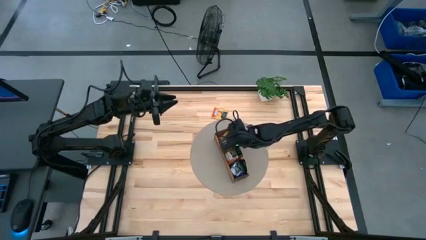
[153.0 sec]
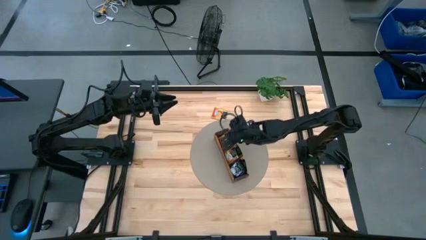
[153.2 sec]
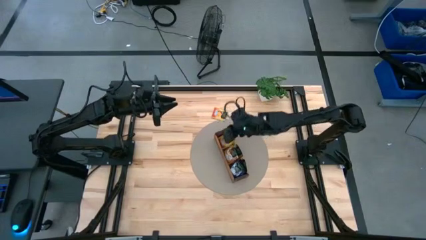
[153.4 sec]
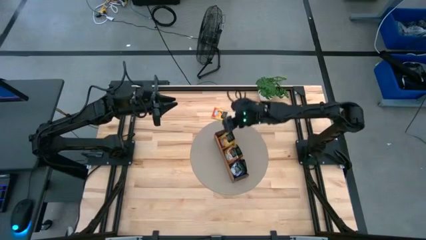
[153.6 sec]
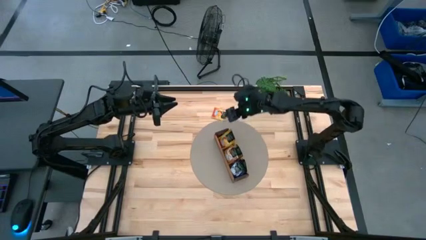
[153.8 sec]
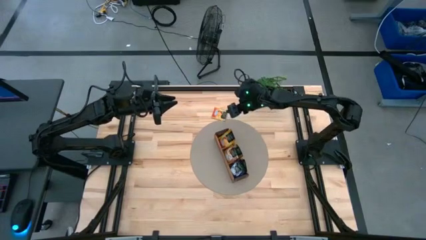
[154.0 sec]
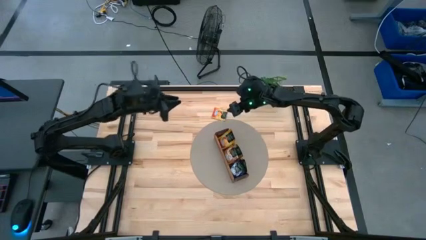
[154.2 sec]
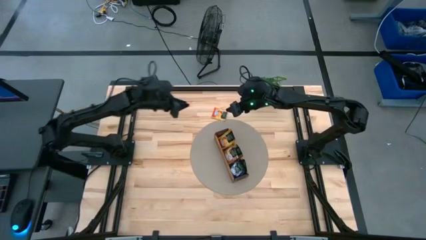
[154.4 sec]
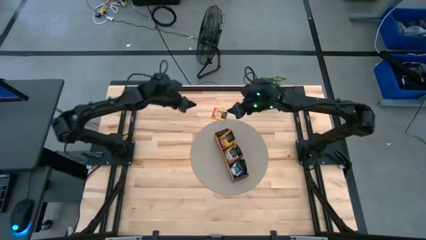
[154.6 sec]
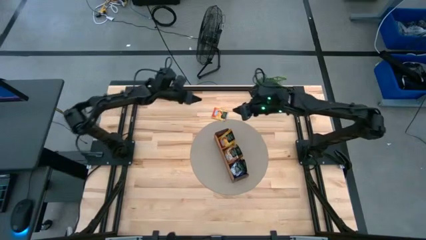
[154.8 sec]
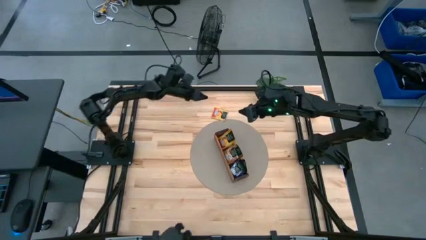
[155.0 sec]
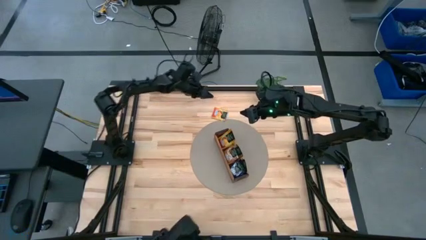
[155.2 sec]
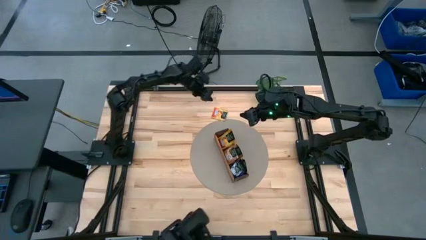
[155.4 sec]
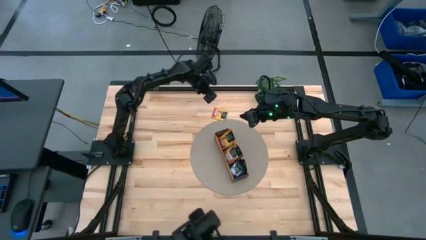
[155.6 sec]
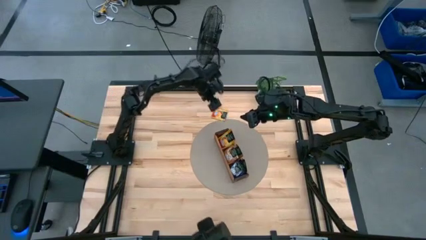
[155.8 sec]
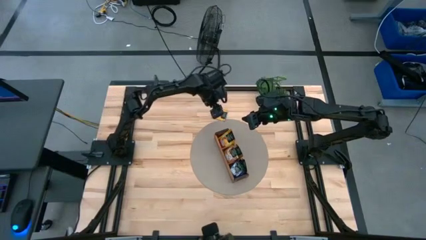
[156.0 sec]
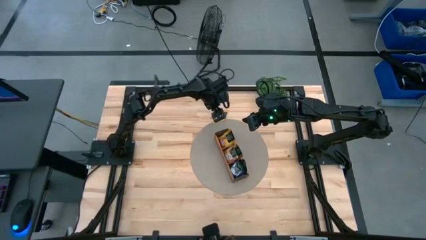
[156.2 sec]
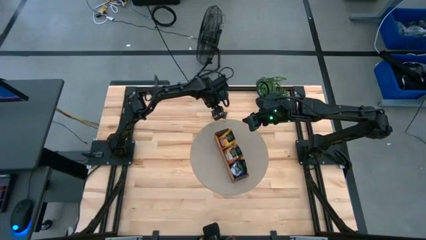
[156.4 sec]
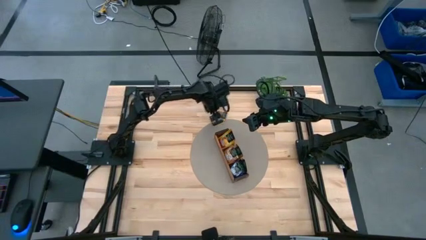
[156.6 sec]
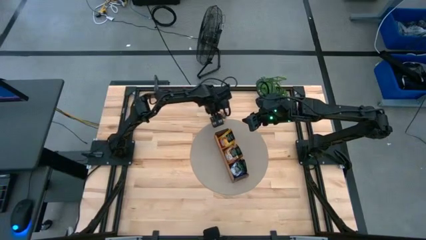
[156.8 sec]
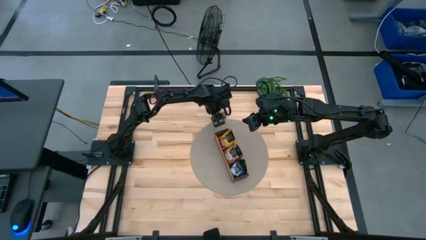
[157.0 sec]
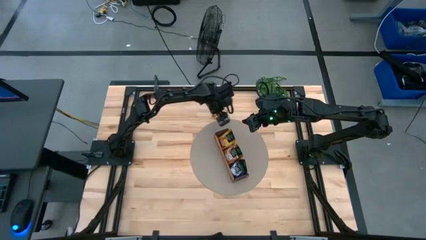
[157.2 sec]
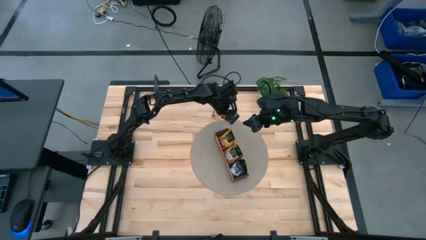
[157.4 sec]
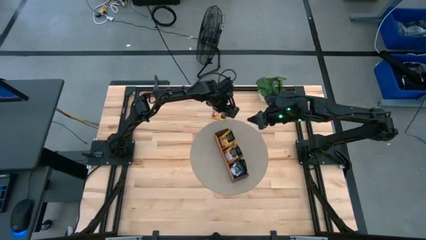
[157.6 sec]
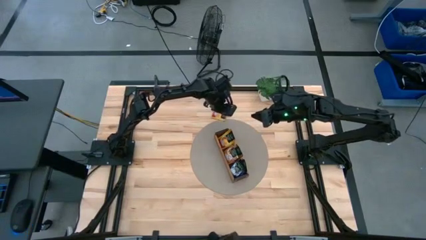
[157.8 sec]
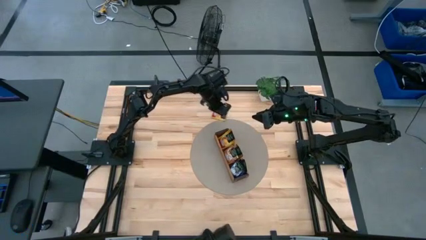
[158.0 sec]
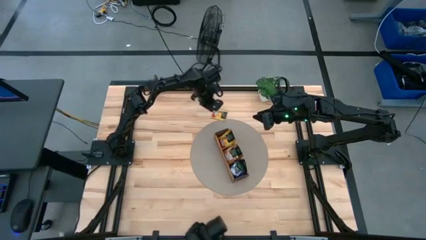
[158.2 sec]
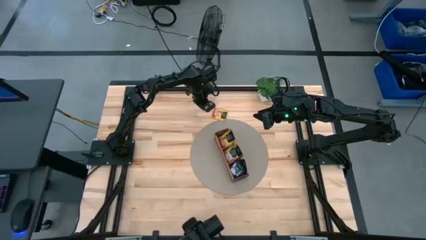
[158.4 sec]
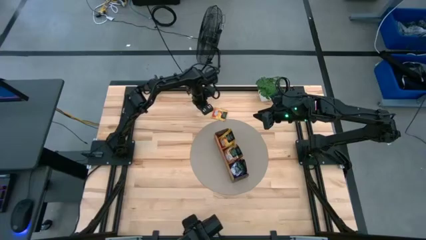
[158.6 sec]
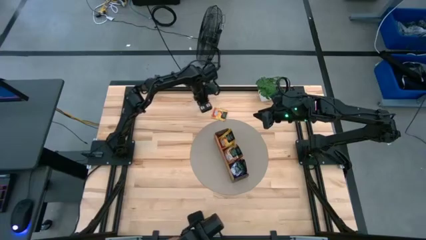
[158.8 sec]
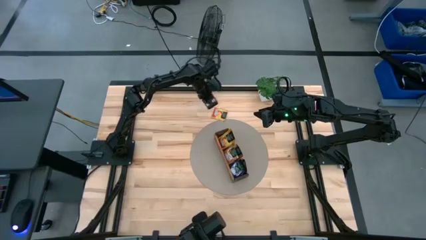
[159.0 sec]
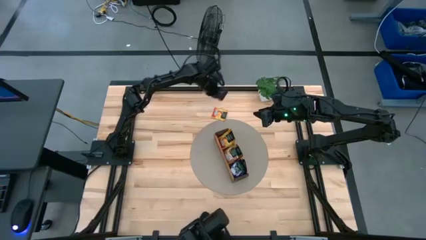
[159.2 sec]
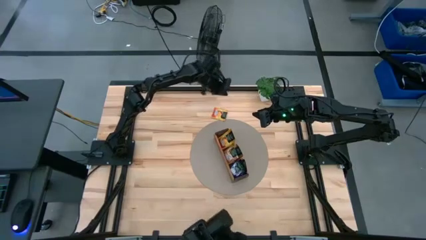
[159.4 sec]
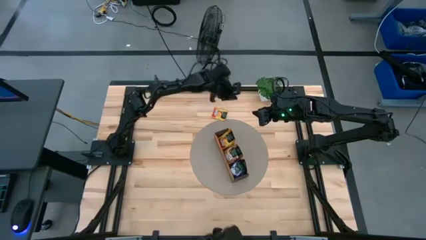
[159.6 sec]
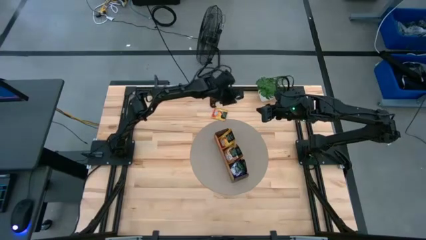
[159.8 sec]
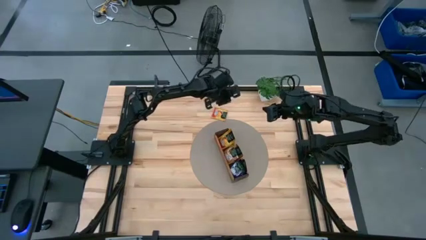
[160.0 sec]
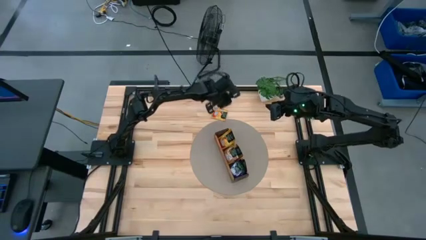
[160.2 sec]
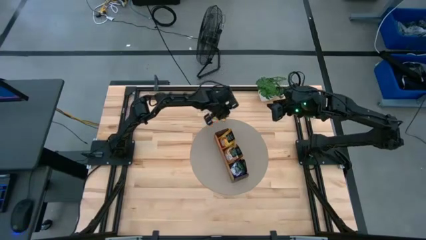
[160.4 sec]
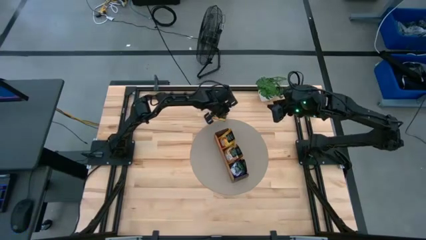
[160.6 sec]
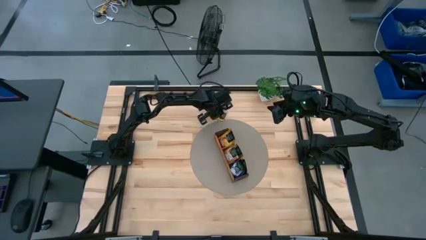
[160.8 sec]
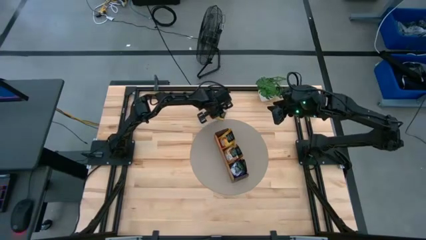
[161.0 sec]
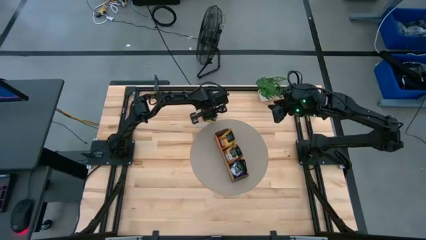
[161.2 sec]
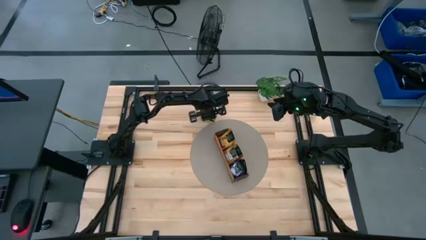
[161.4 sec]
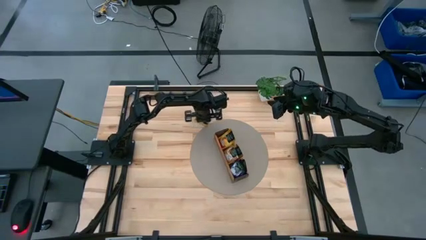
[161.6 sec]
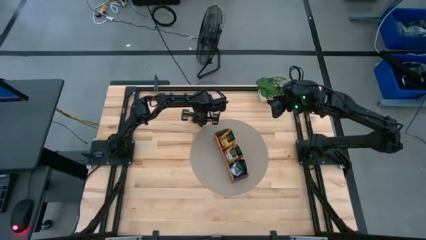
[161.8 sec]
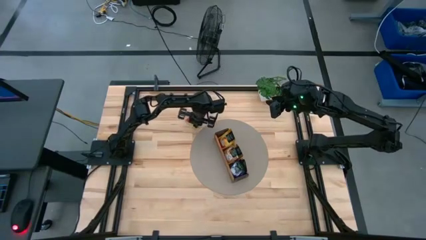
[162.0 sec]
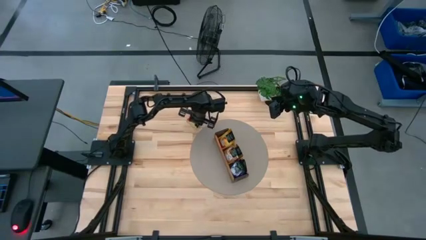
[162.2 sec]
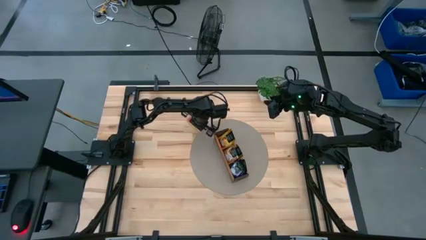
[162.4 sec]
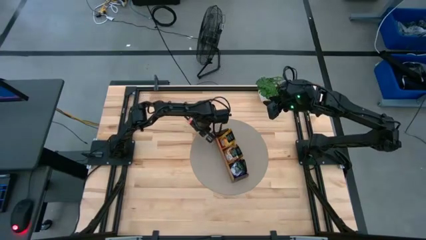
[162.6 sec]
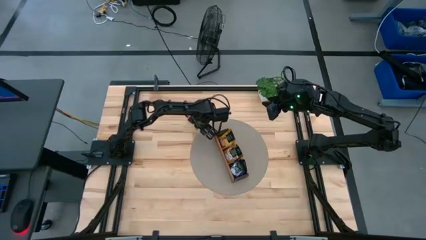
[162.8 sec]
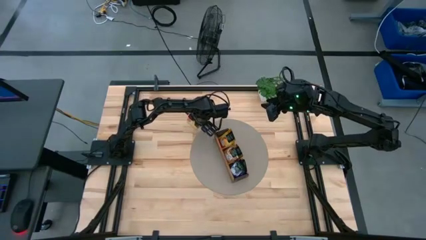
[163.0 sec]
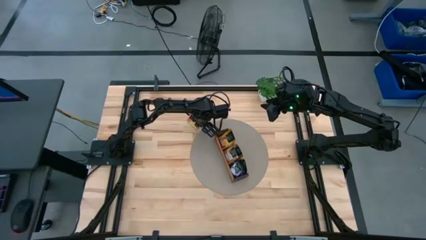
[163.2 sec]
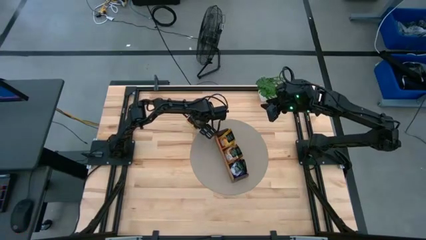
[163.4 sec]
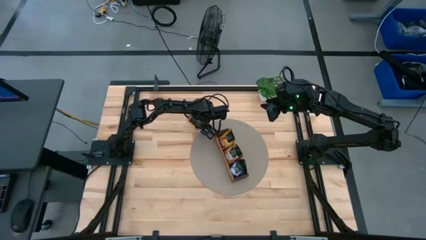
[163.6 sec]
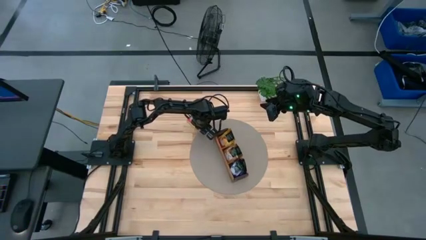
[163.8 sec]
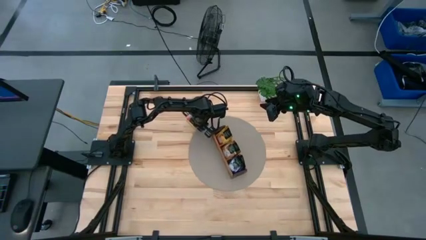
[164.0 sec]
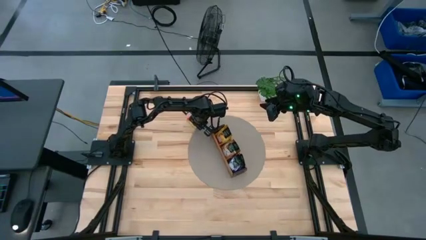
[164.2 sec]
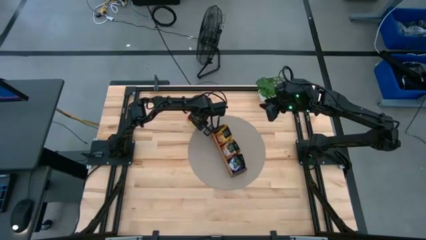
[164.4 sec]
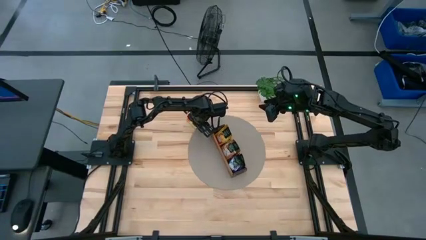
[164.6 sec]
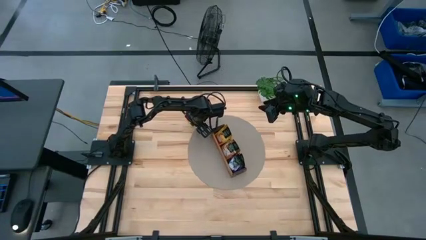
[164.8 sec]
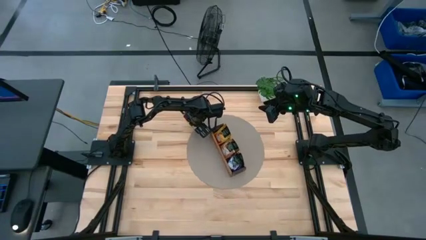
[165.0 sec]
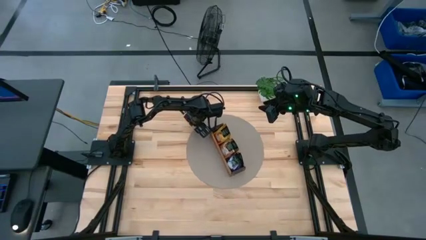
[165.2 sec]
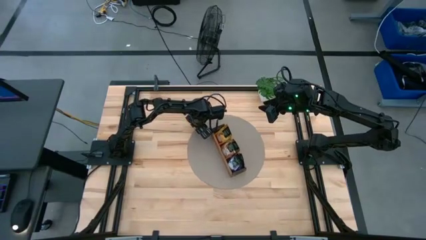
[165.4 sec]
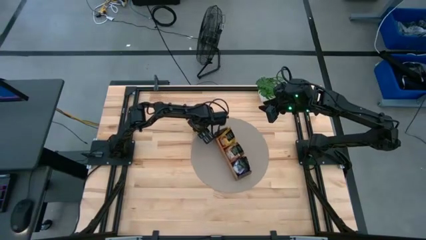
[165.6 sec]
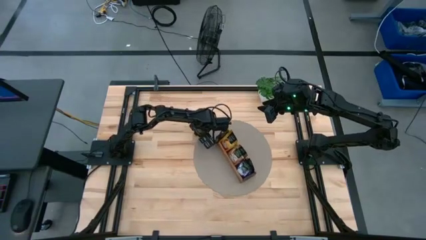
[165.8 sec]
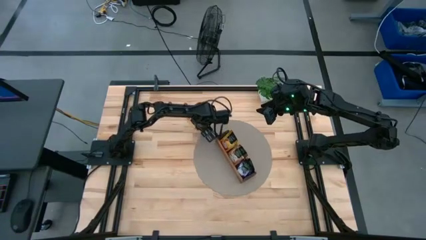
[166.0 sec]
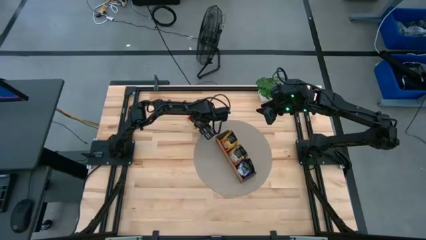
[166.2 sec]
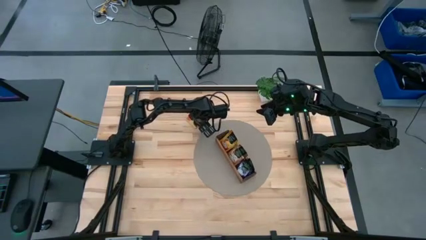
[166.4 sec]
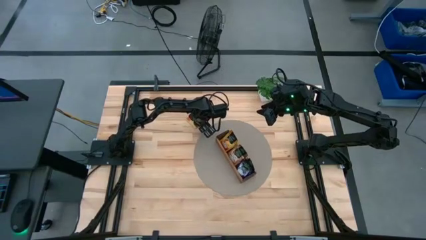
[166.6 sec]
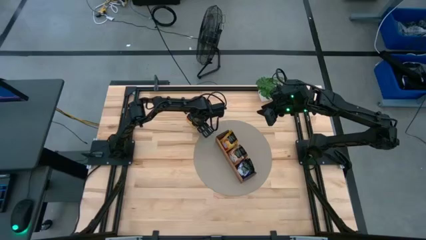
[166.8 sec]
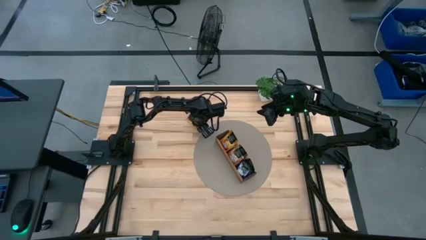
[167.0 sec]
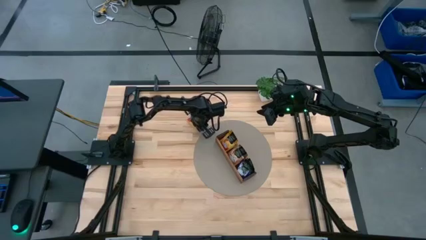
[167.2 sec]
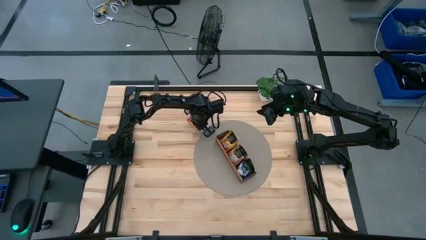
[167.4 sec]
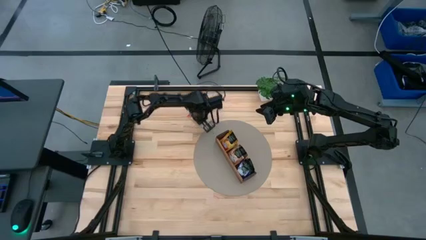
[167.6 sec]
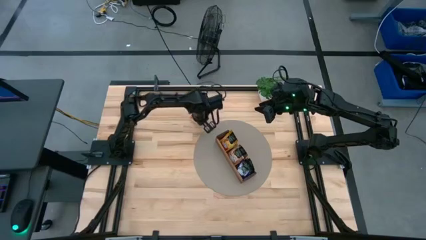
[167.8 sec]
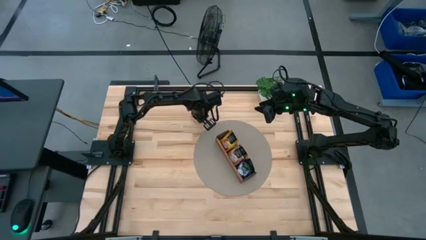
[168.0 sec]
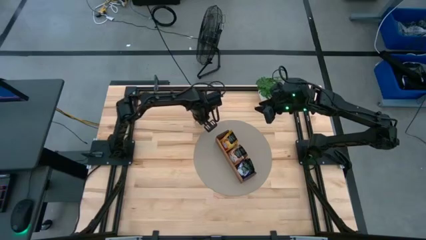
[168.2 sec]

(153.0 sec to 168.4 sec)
Task: Pick & Place Tea
Put the orange tea bag into the left section of the wooden organizer

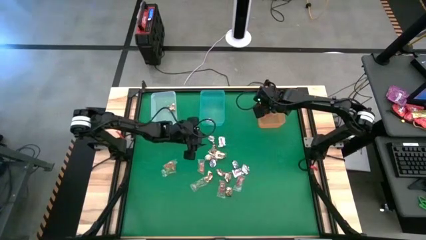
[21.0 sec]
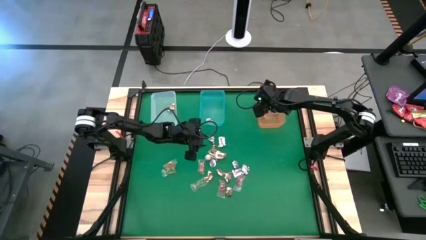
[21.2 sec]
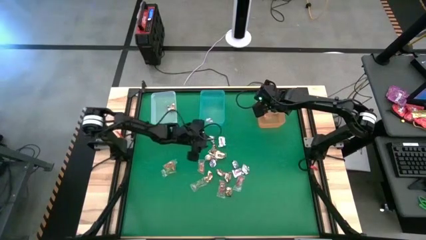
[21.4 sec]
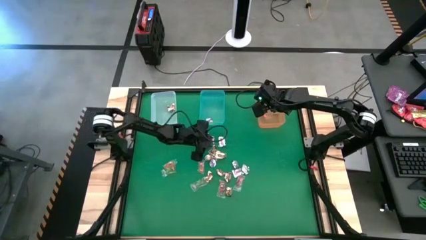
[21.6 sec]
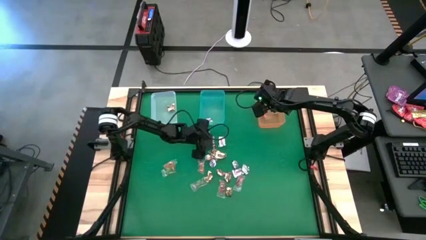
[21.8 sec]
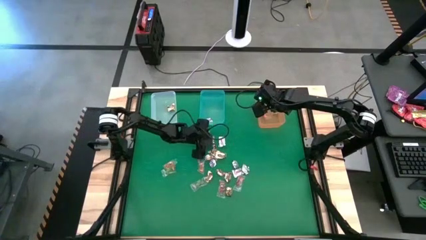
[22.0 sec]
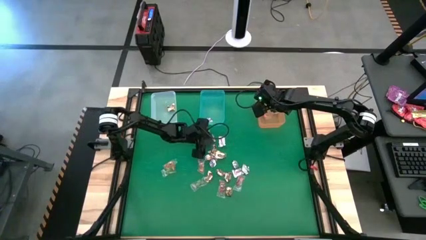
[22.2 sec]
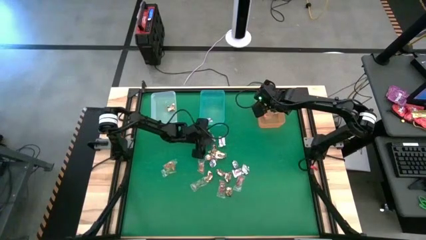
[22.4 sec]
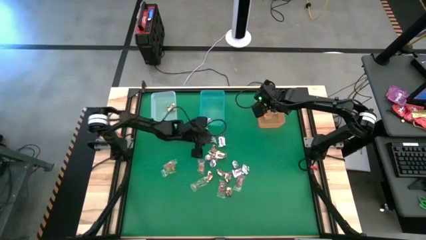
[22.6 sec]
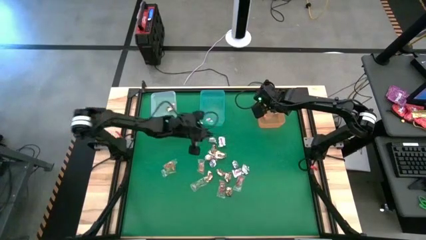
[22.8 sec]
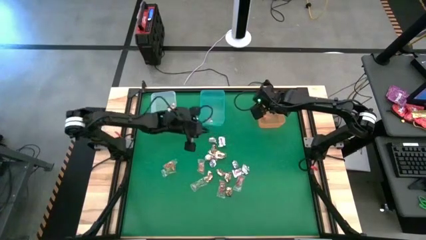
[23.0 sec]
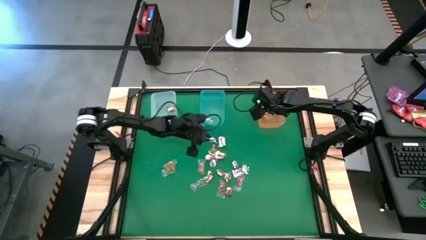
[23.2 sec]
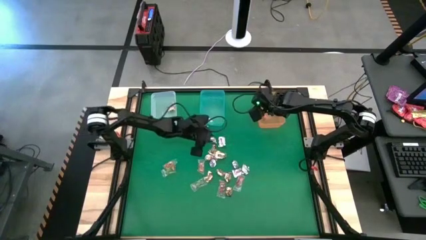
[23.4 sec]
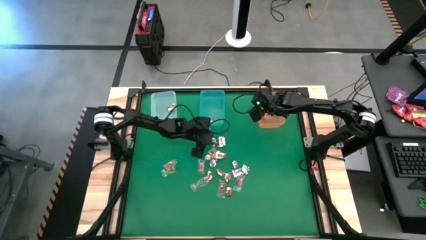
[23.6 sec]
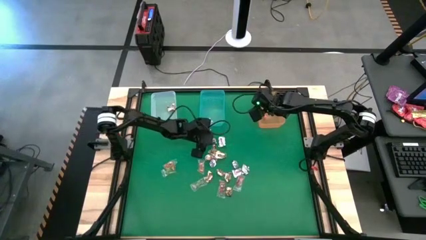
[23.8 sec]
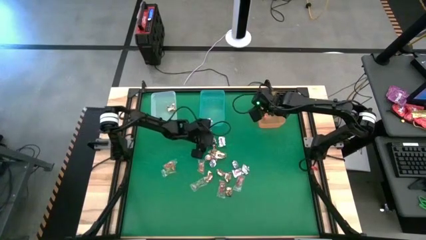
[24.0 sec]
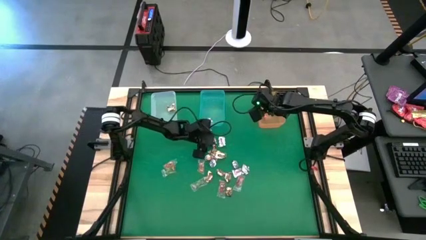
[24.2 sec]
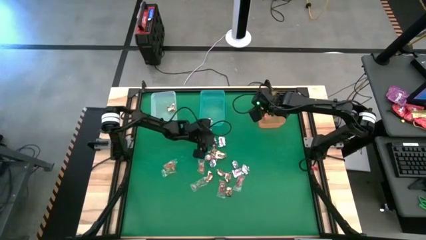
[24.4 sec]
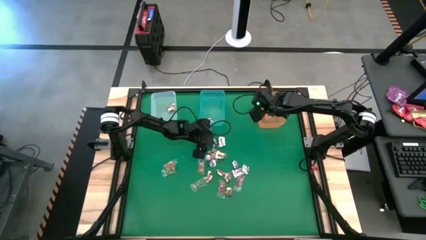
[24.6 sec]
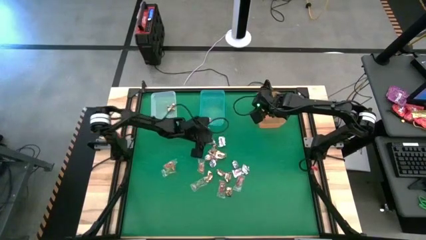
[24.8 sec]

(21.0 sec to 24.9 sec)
Task: Sort candy by brand, put in halloween buckets
Put the silver wrap candy into the blue bin
